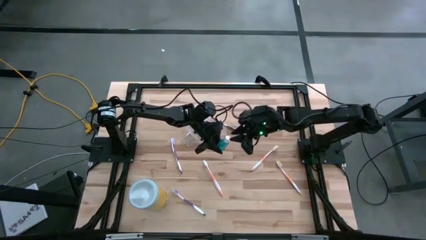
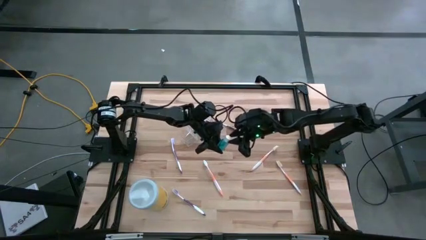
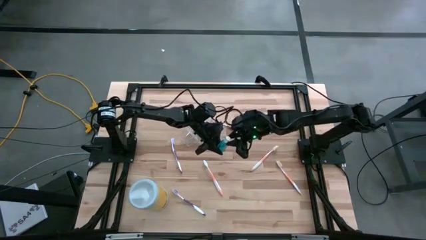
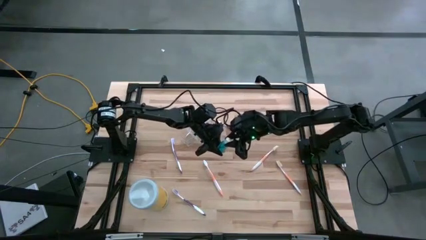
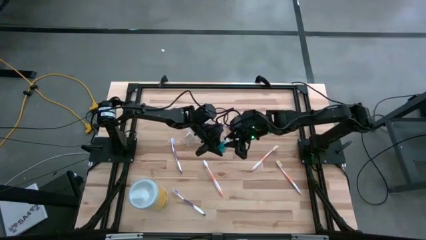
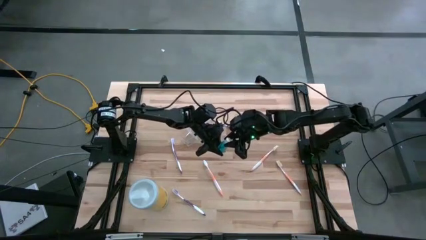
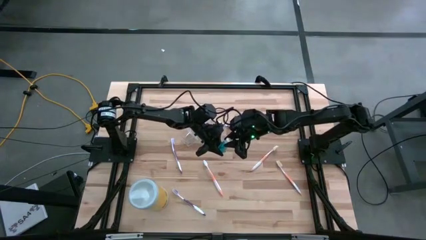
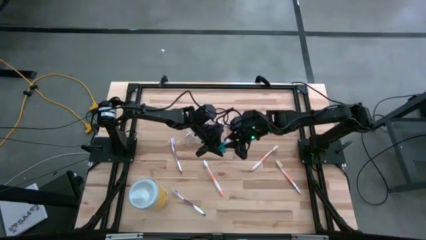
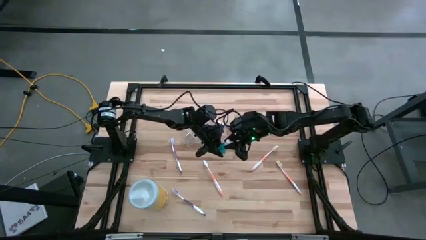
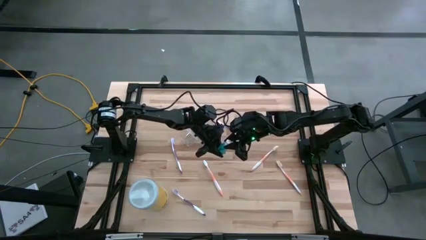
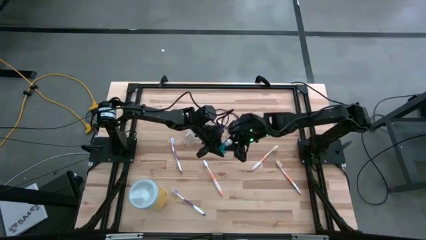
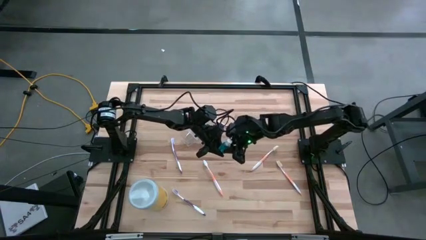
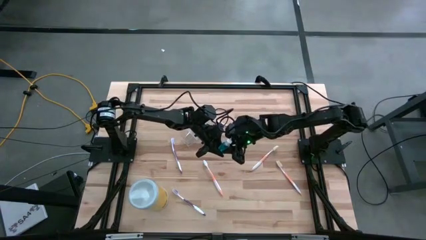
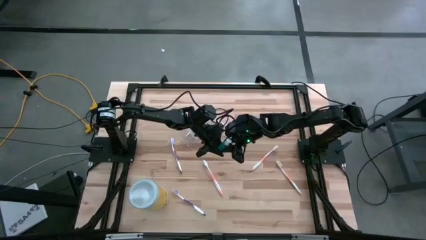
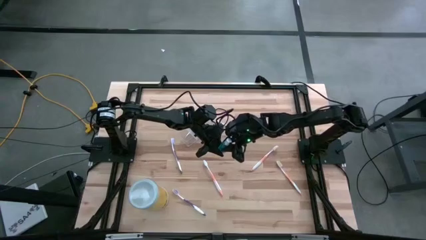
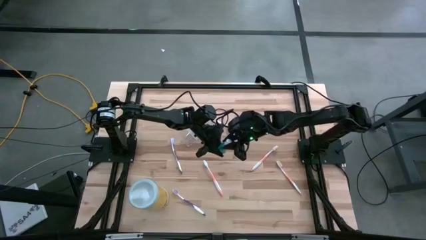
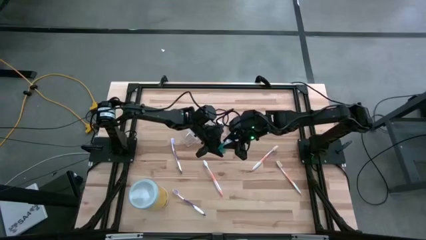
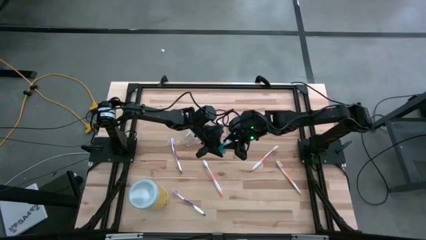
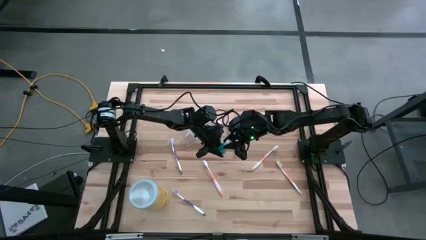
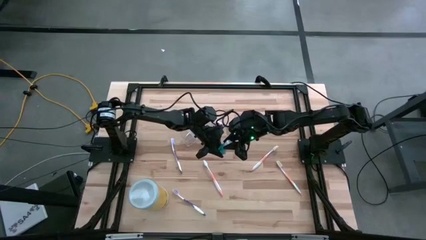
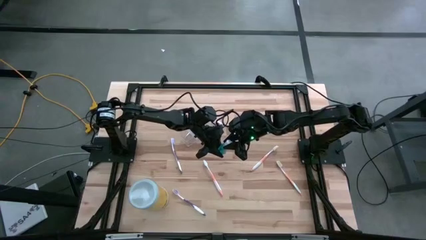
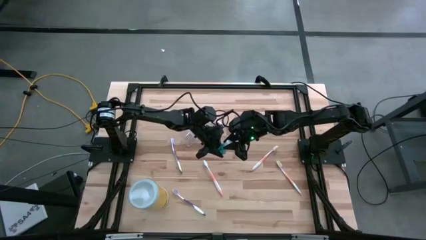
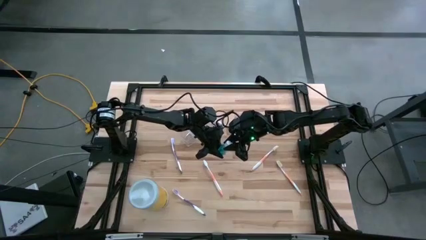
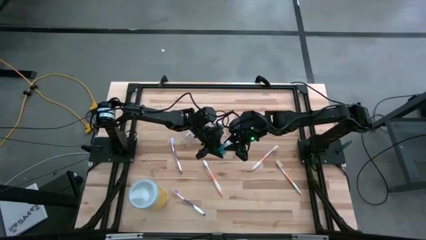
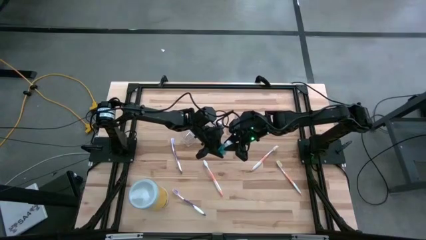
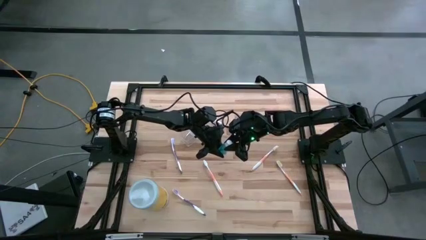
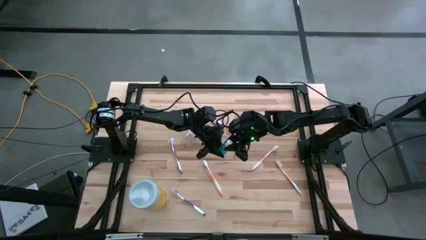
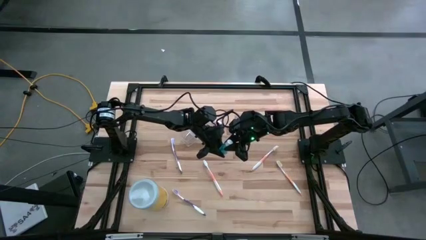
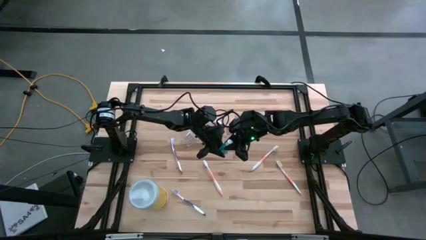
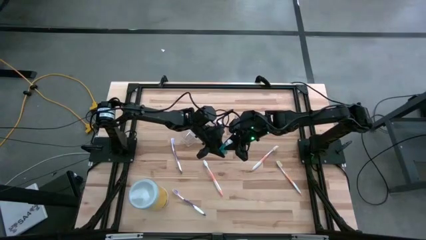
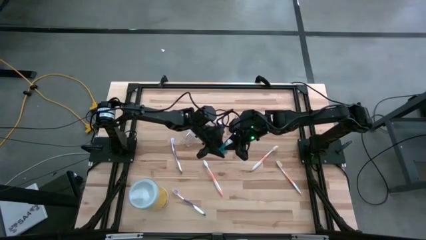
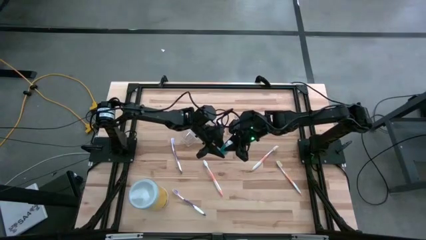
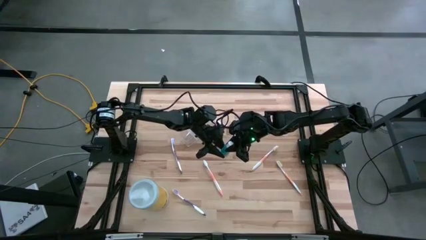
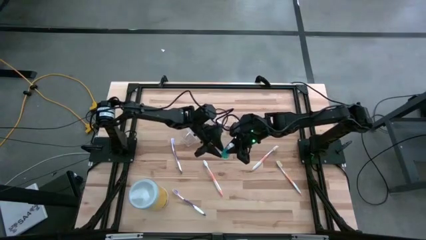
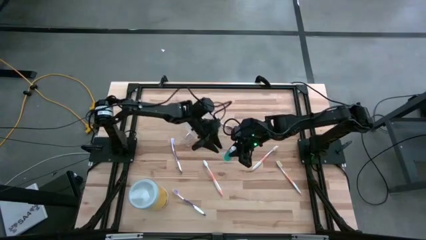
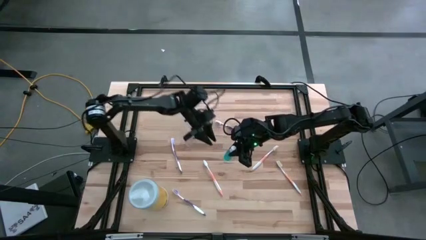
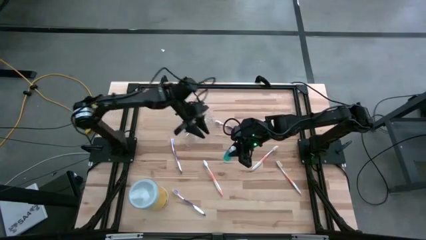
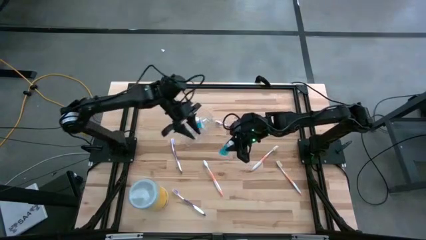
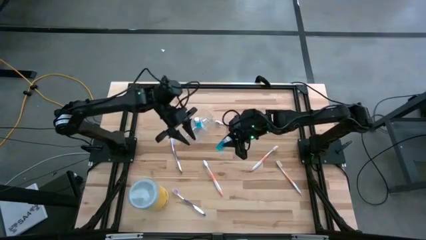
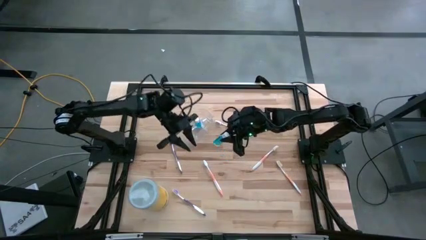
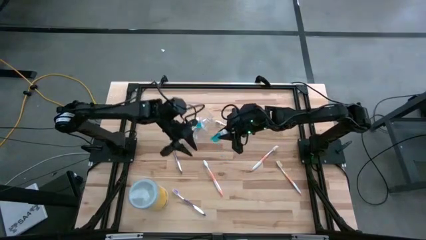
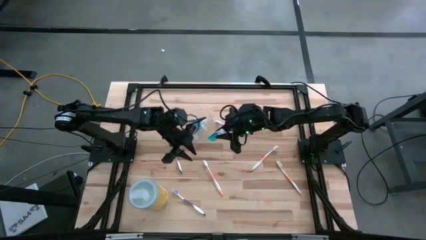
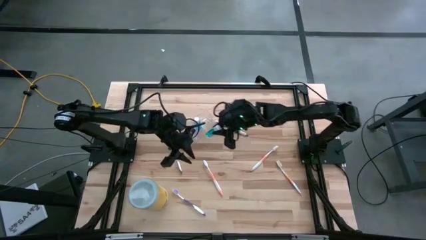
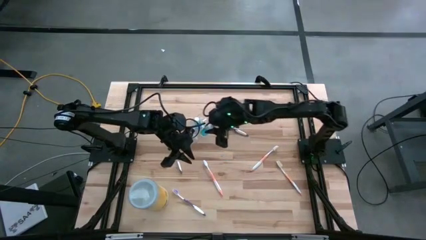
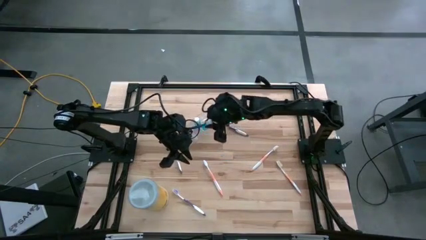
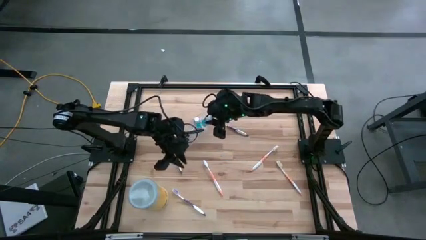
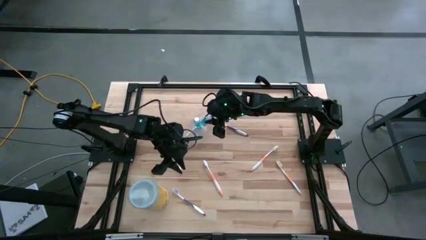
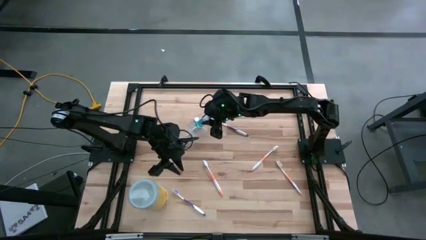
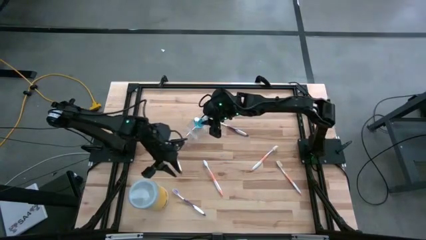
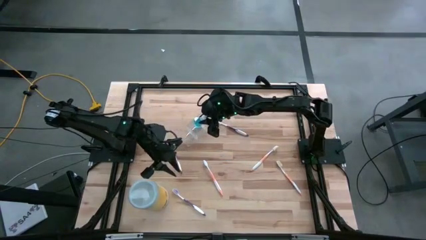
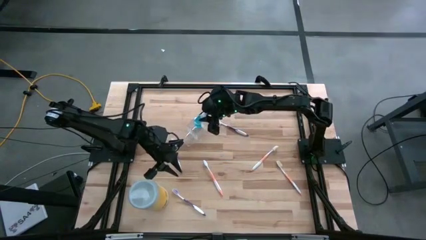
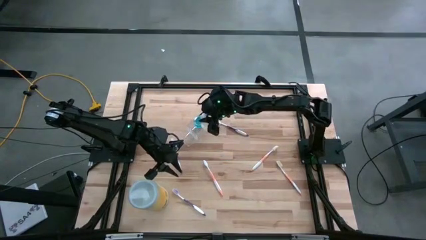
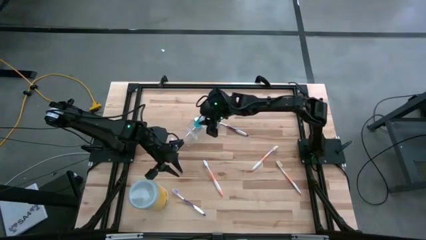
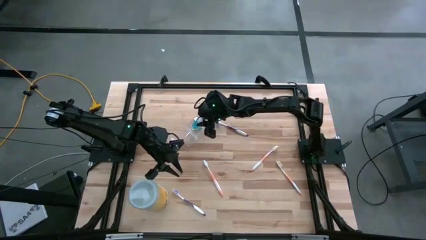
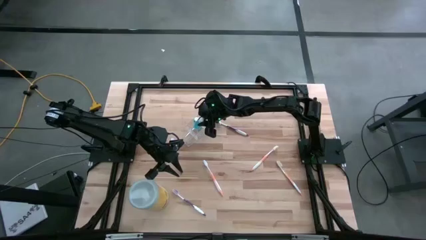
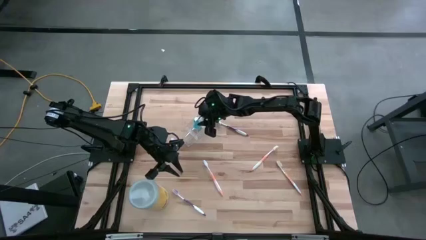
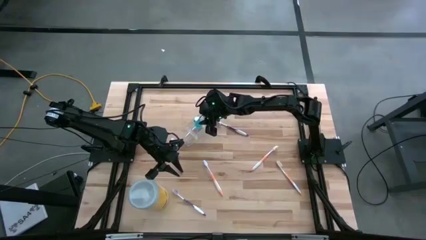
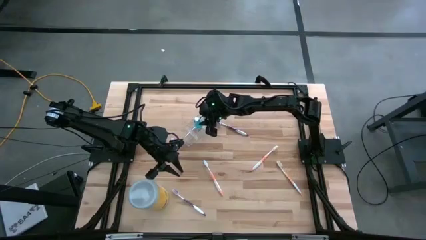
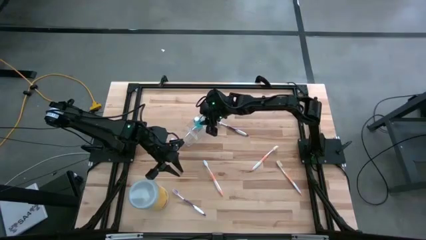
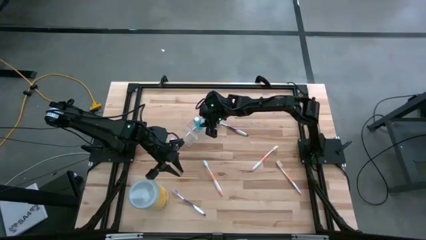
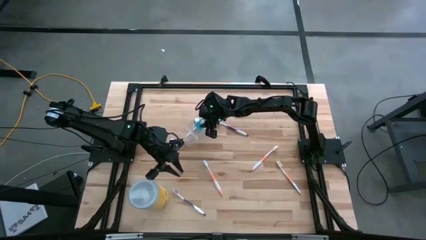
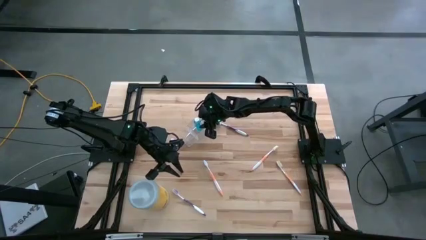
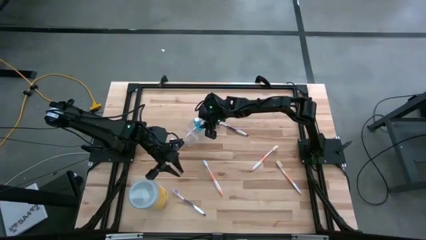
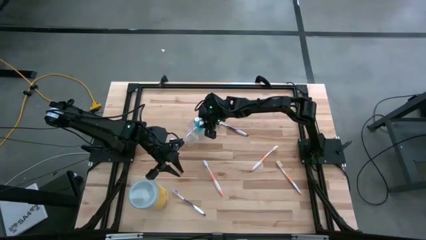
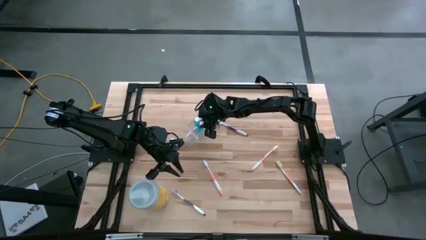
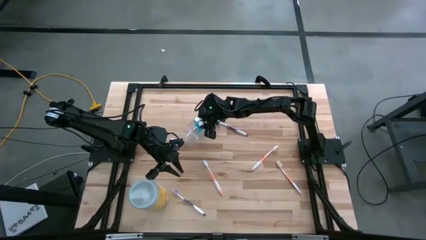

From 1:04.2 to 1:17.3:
Task: Pick & Place toothbrushing station
Put the blue mouthwash into the transparent organizer
